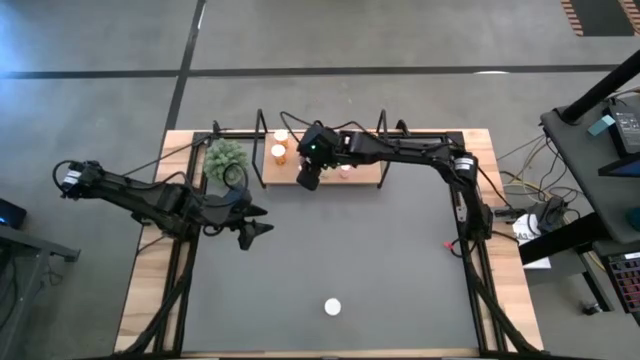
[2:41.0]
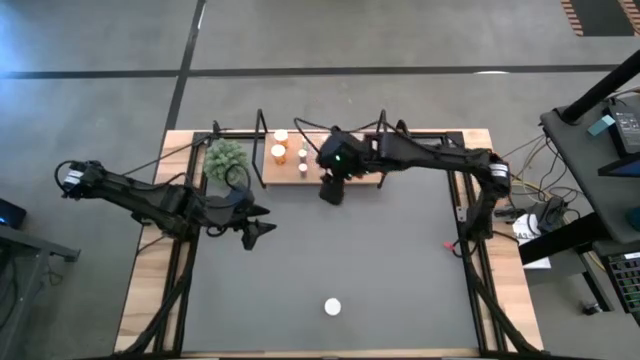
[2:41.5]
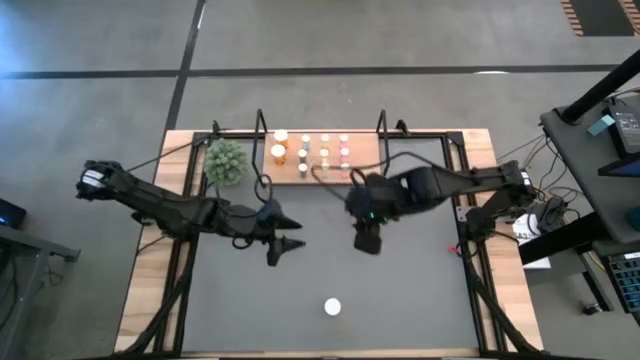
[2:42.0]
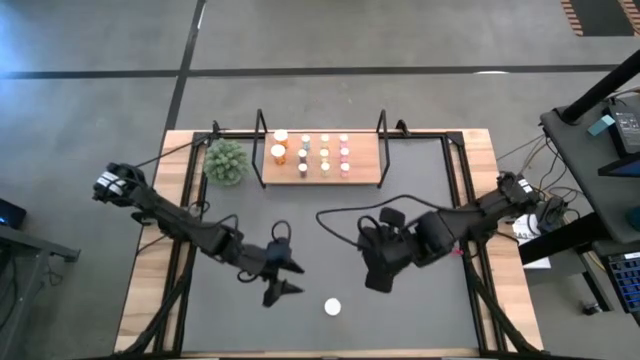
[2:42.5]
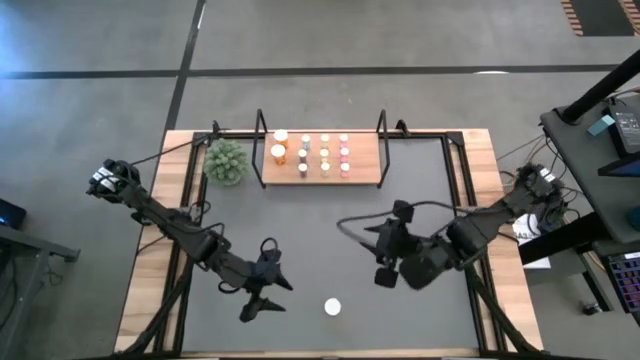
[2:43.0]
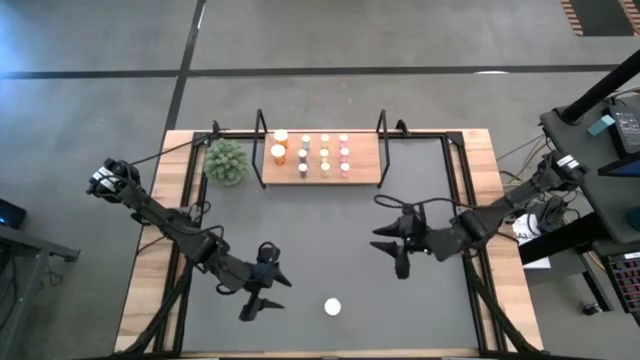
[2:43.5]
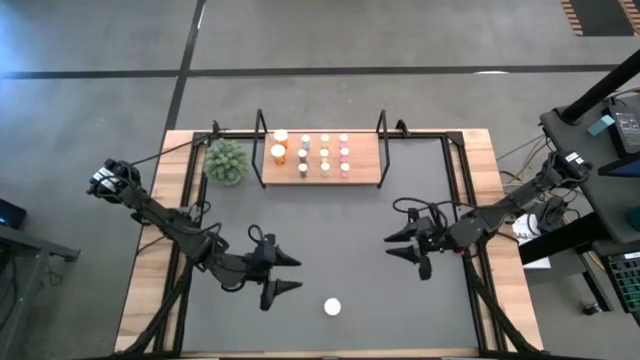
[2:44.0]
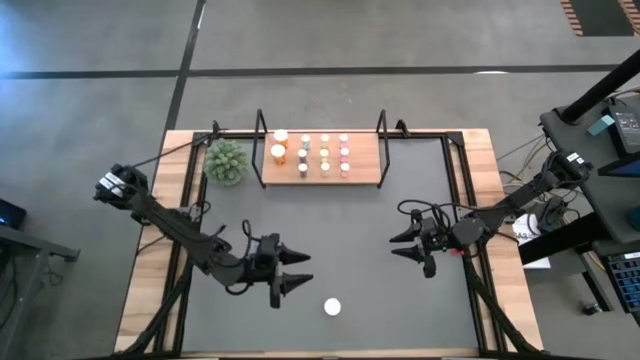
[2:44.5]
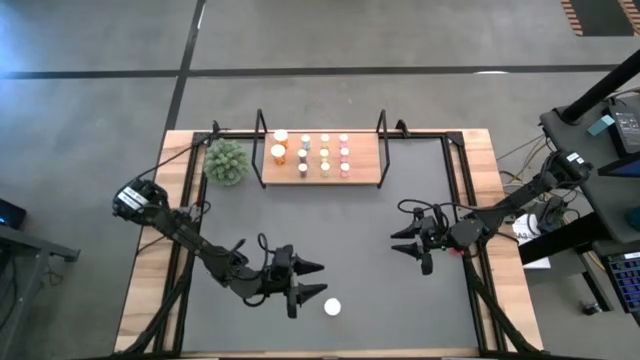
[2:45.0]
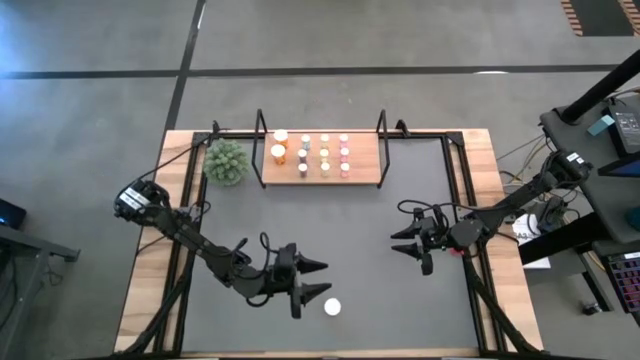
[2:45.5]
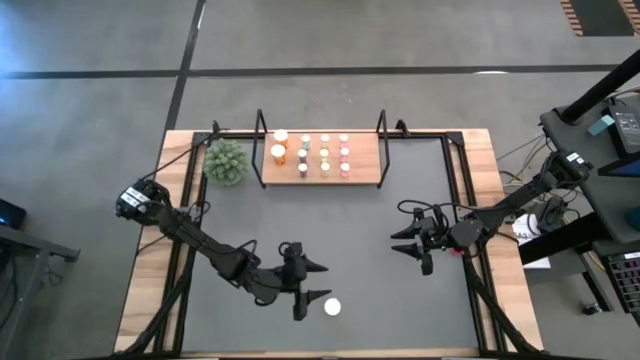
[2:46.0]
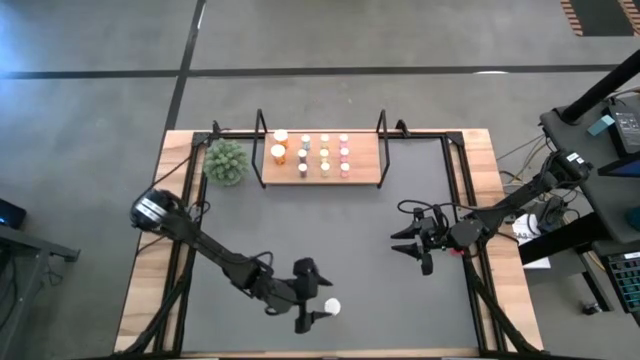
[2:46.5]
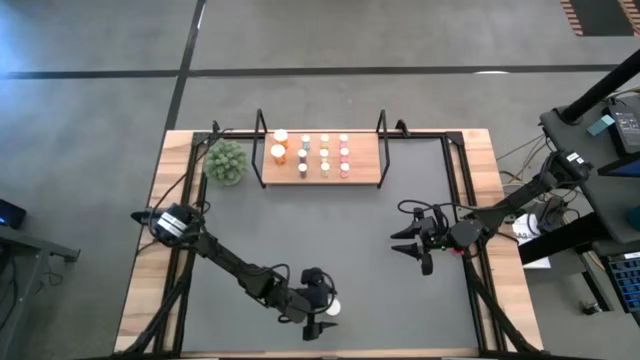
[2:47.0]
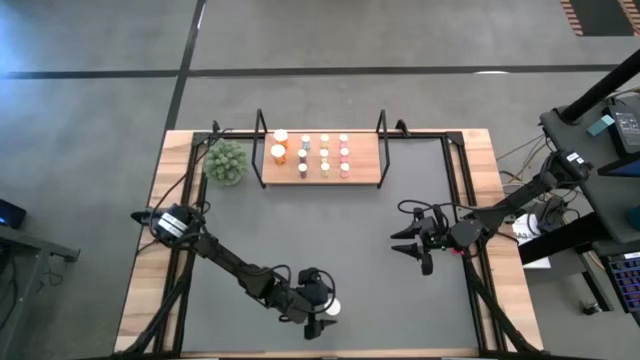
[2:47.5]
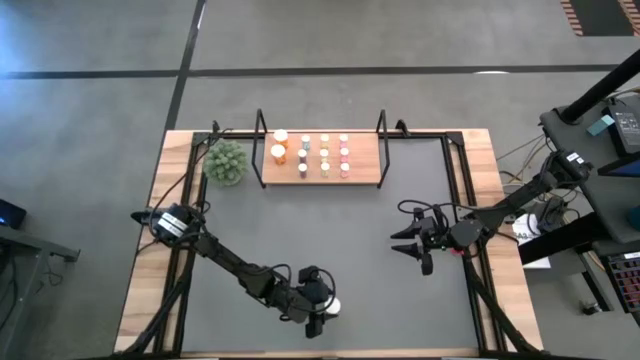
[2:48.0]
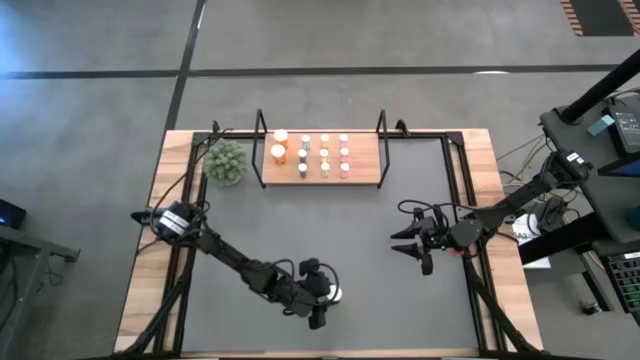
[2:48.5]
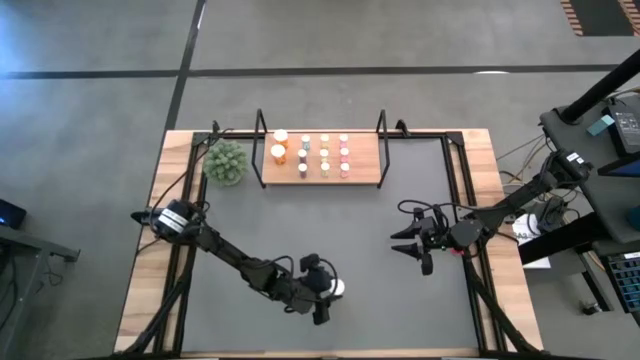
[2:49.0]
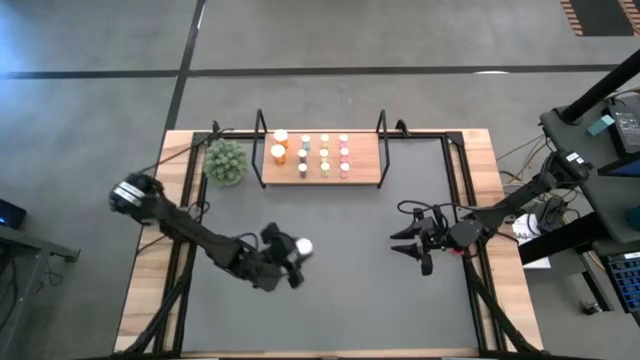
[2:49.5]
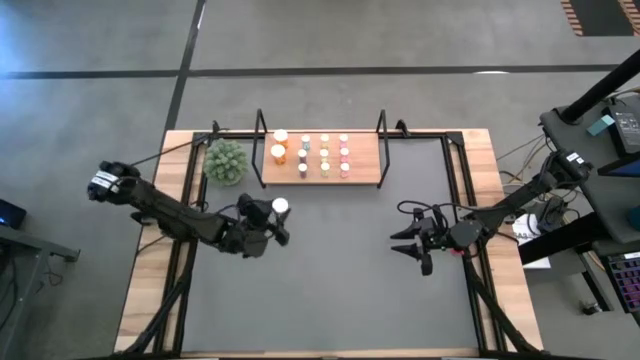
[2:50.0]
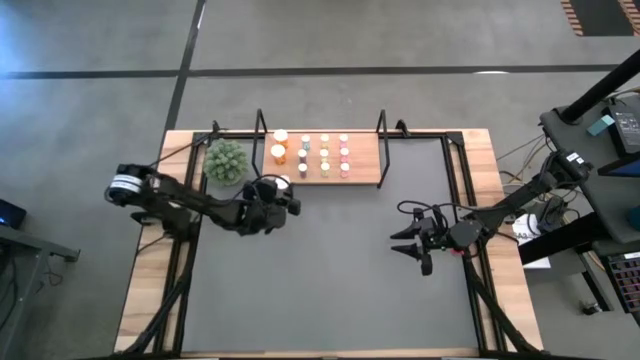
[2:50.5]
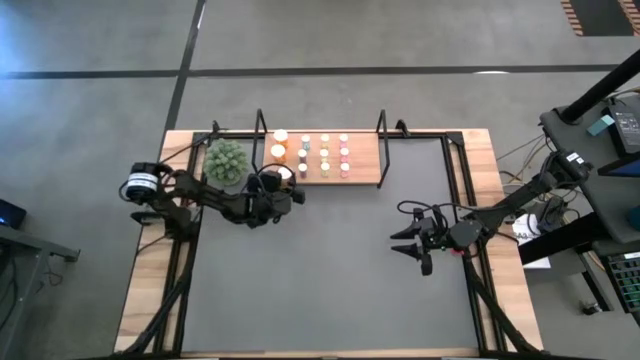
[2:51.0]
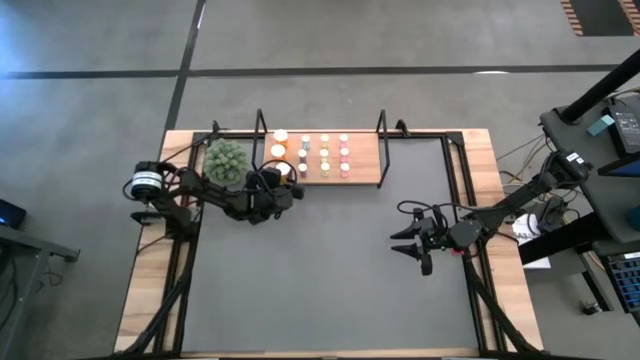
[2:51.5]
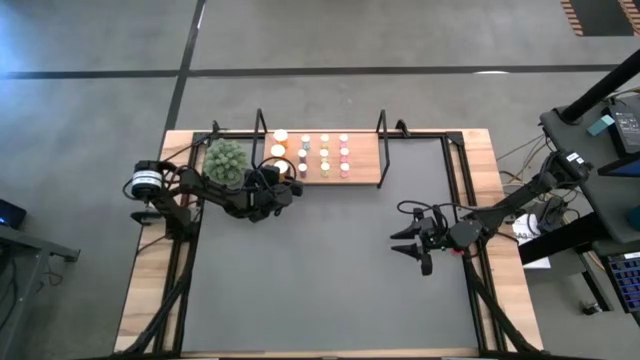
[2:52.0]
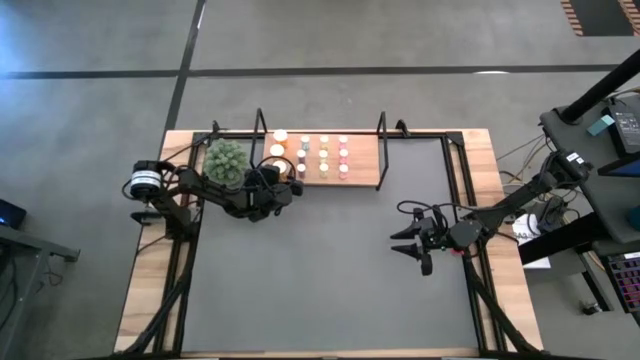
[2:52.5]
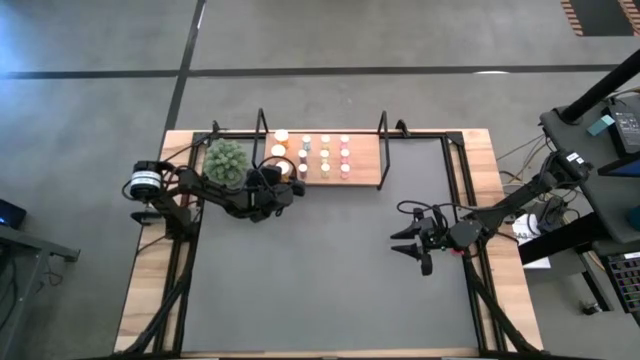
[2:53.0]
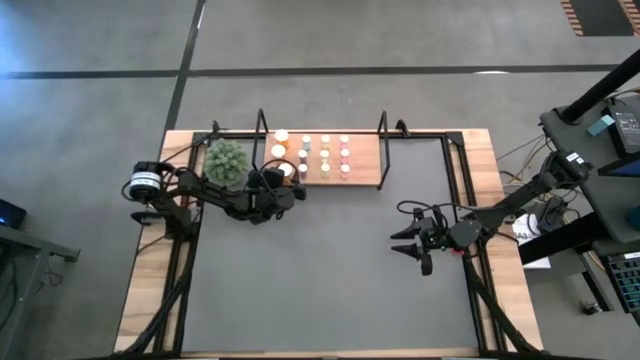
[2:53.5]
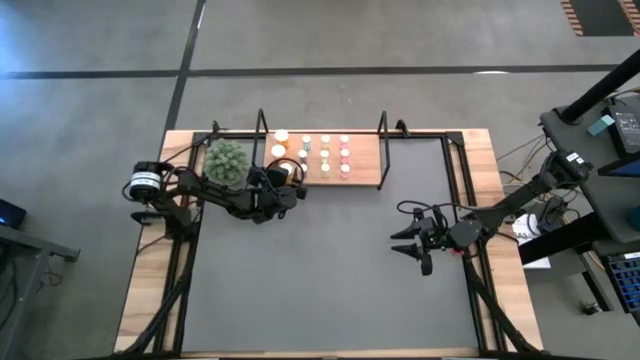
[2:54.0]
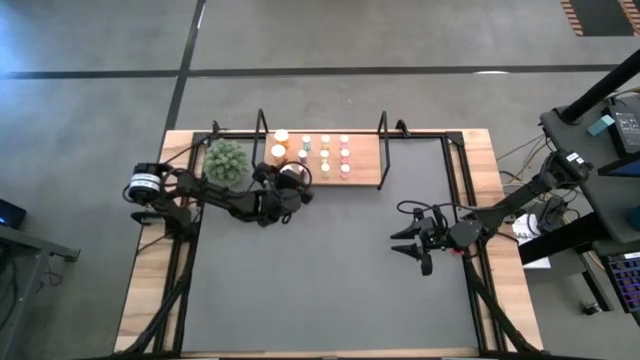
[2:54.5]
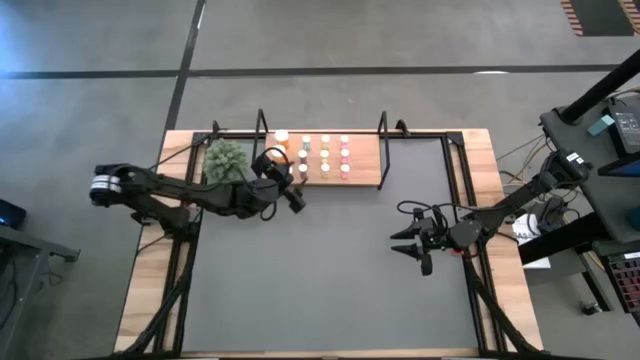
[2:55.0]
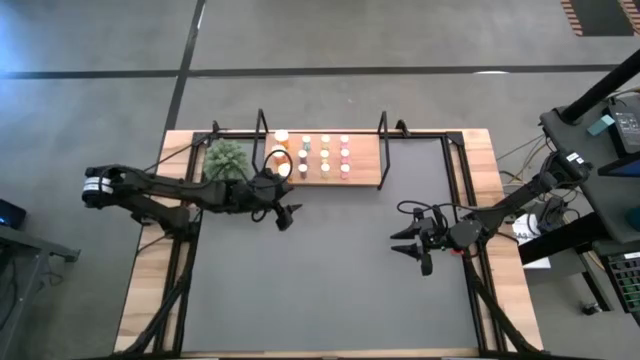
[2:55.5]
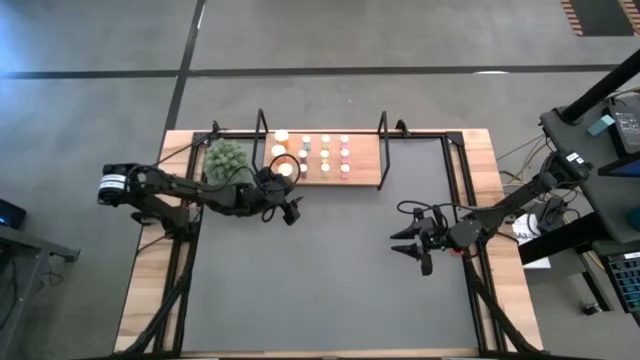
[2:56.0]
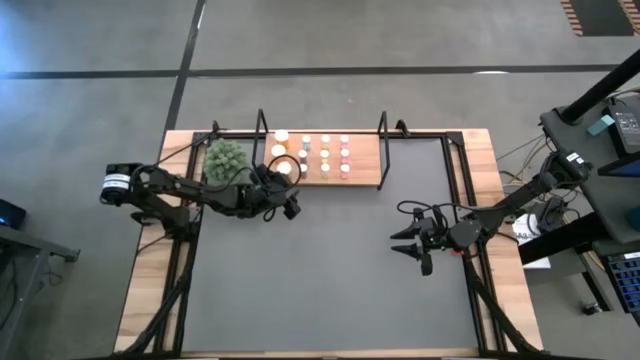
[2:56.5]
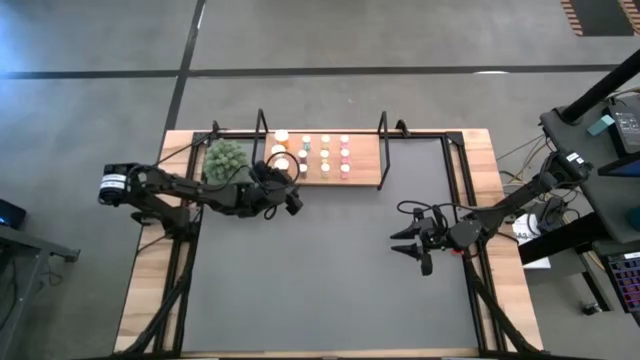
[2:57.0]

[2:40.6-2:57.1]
Task: Pick and place medicine bottles onto shelf by color
Put the orange pill bottle on the shelf aligned with the other orange pill bottles

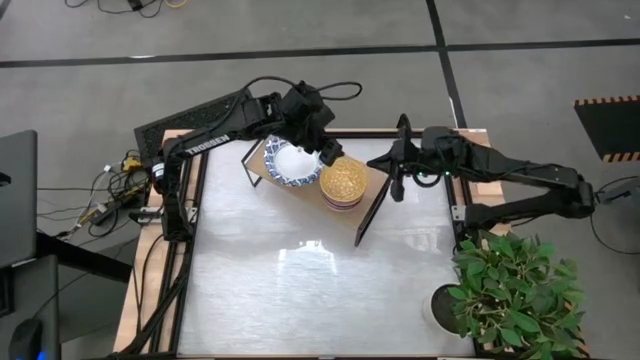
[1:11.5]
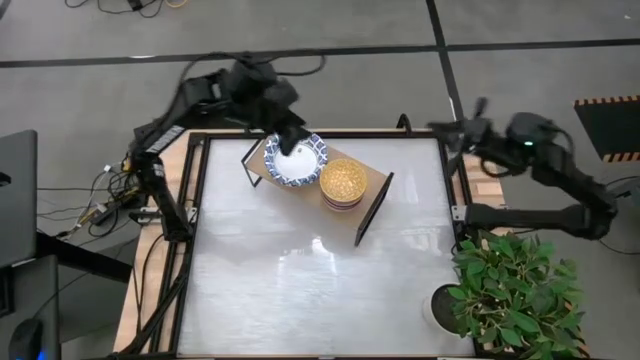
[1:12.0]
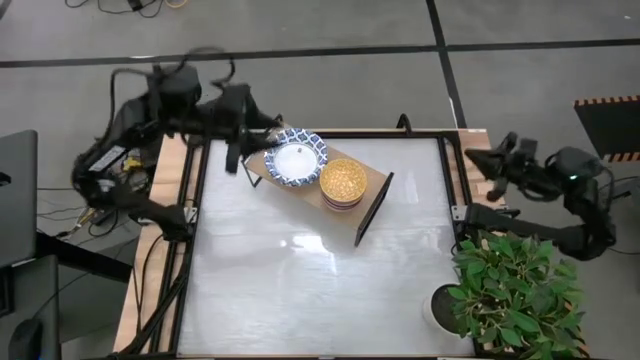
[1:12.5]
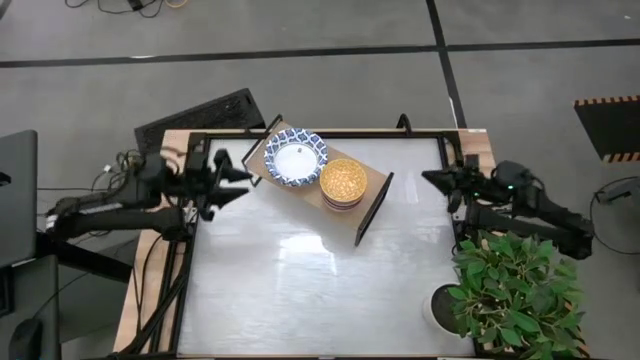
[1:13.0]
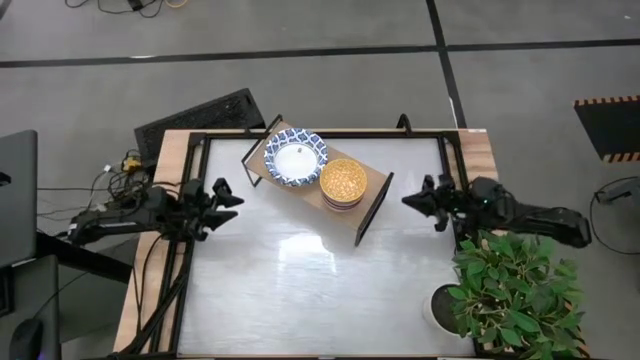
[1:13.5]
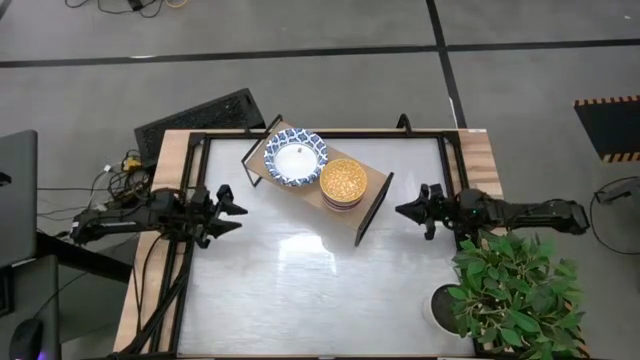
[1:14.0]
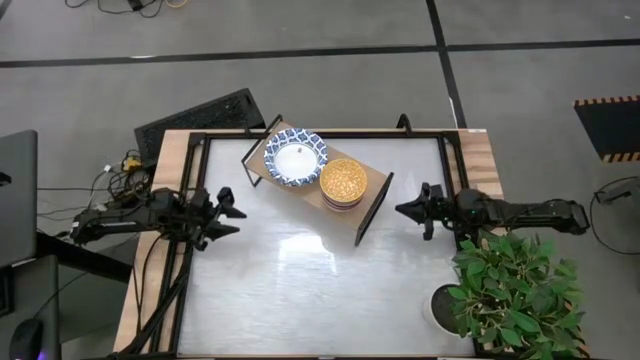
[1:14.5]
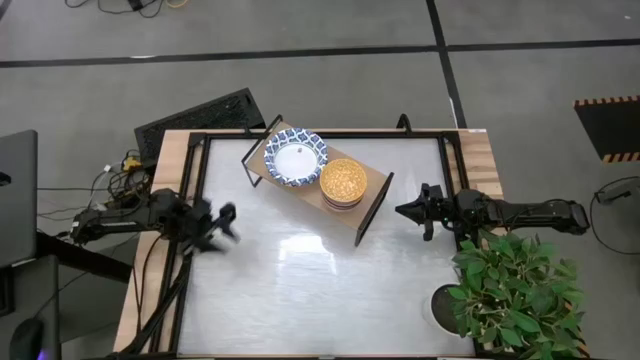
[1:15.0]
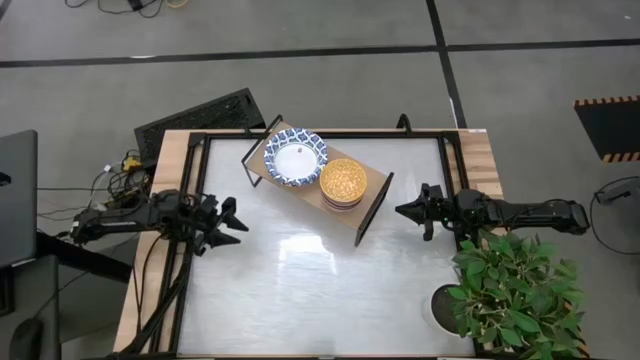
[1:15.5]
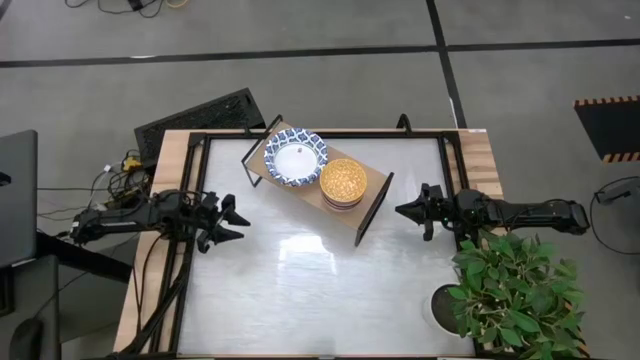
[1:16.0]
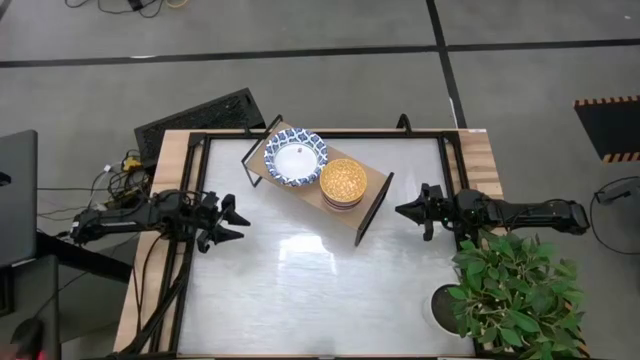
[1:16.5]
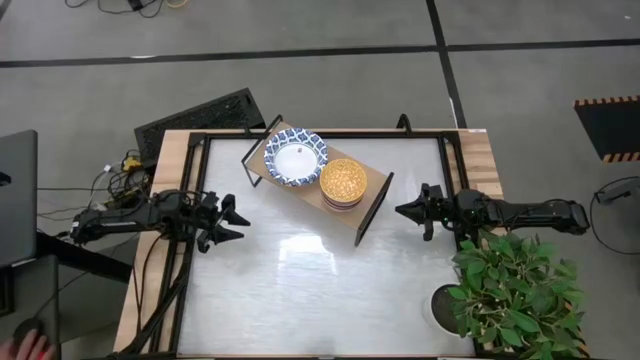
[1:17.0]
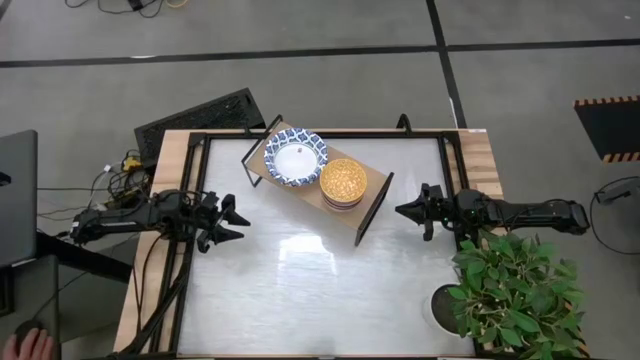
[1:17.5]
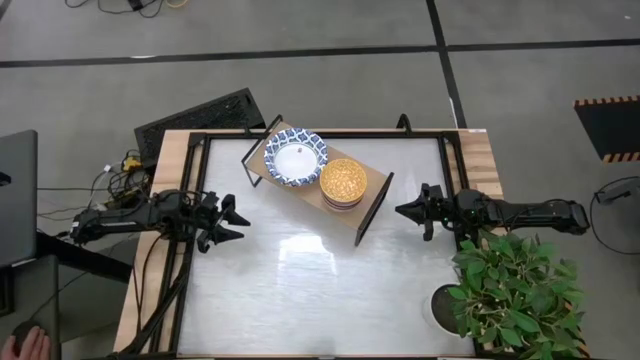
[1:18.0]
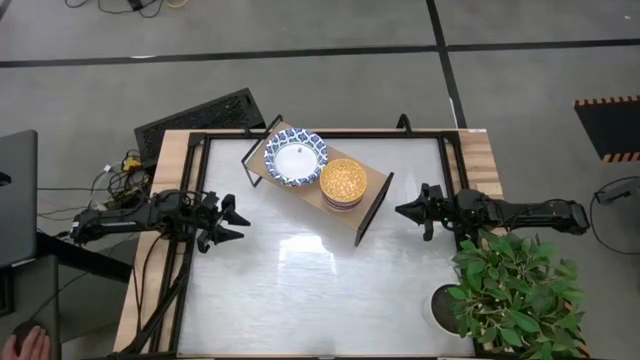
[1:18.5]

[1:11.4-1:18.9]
Task: Place and stack bowls onto a shelf
Return to Home Position
